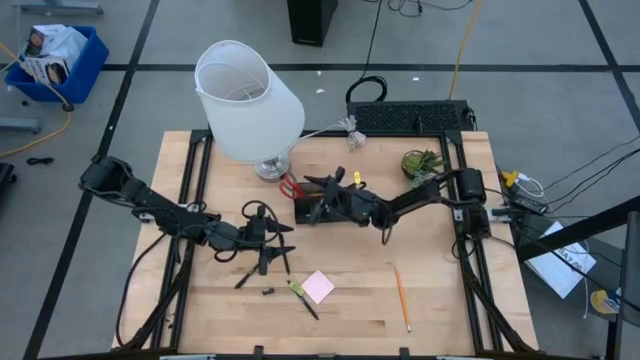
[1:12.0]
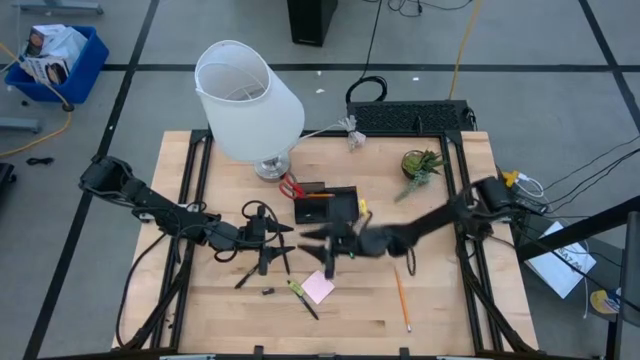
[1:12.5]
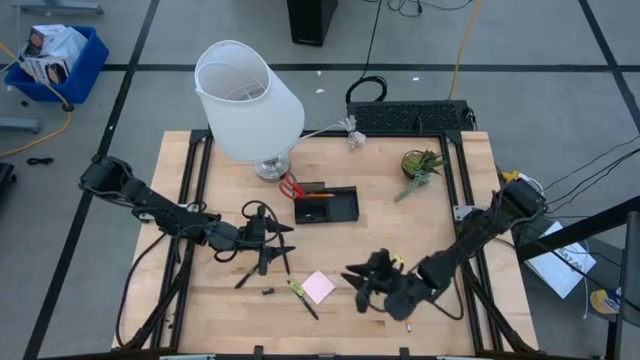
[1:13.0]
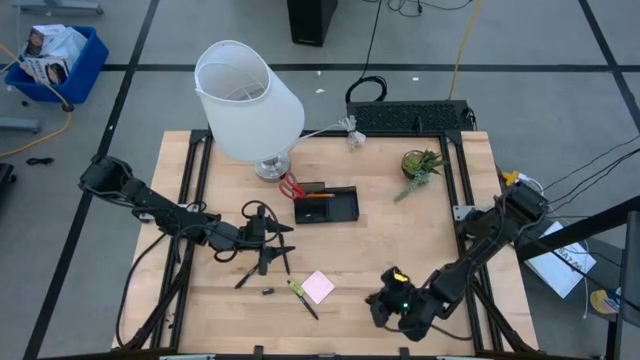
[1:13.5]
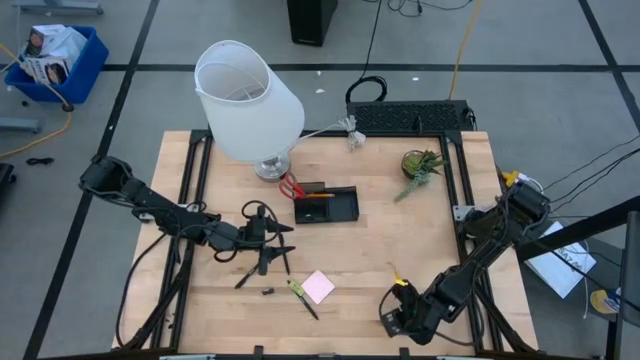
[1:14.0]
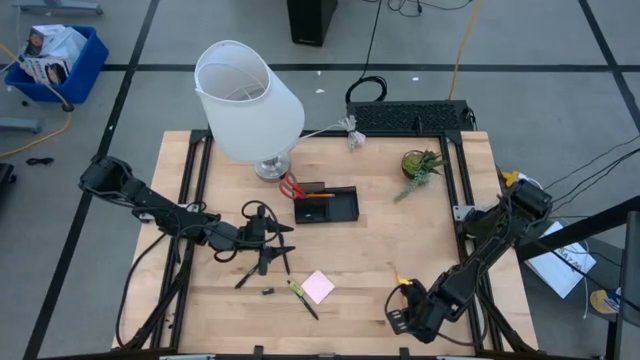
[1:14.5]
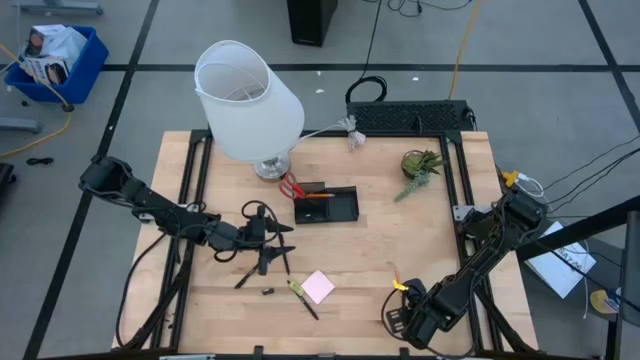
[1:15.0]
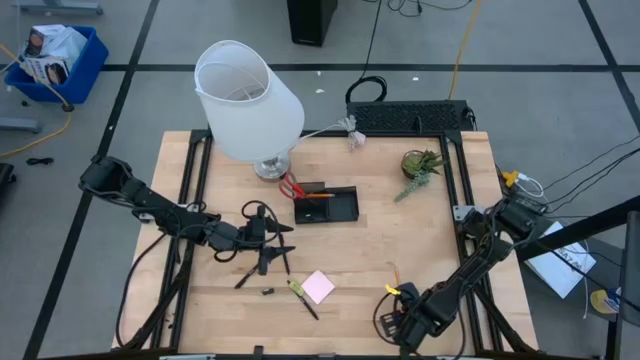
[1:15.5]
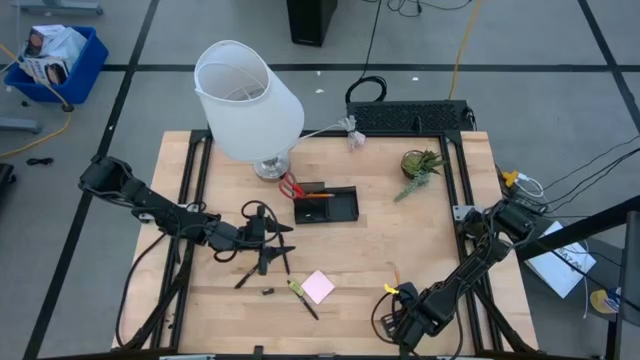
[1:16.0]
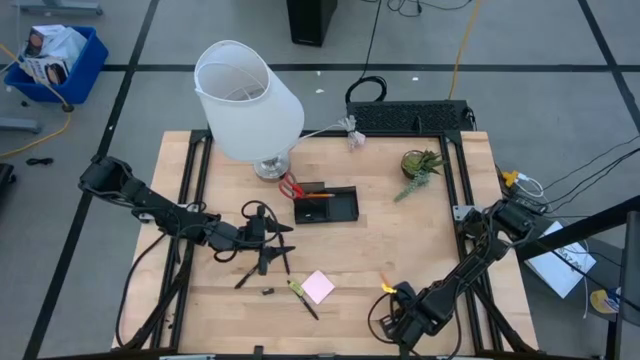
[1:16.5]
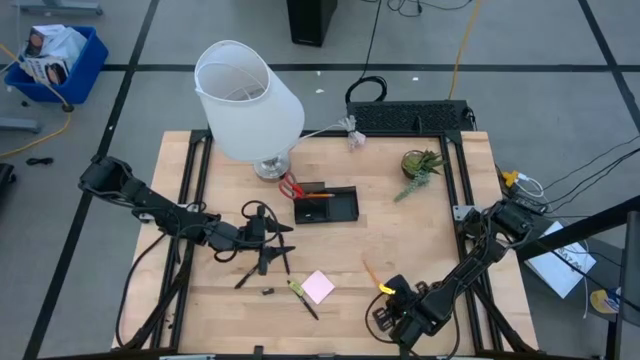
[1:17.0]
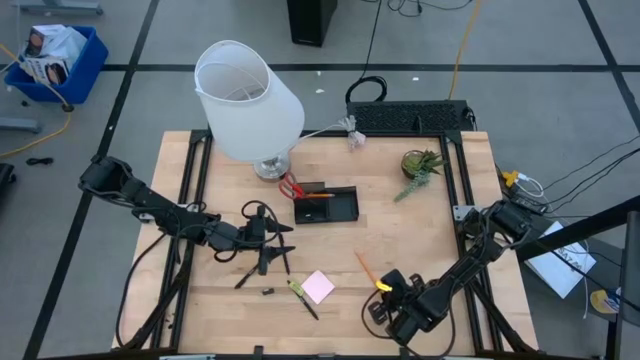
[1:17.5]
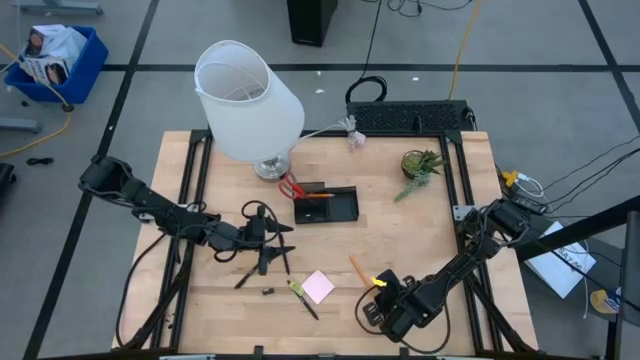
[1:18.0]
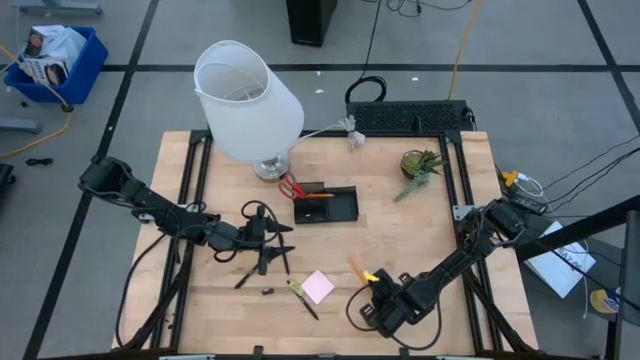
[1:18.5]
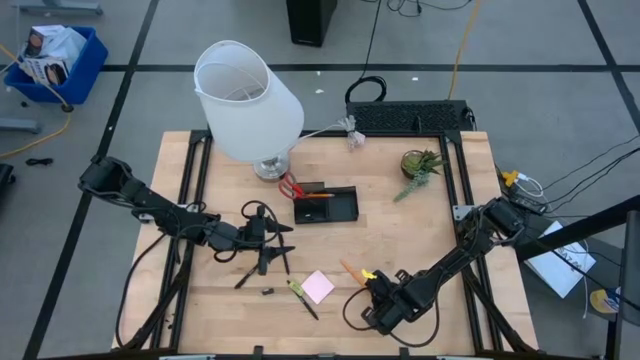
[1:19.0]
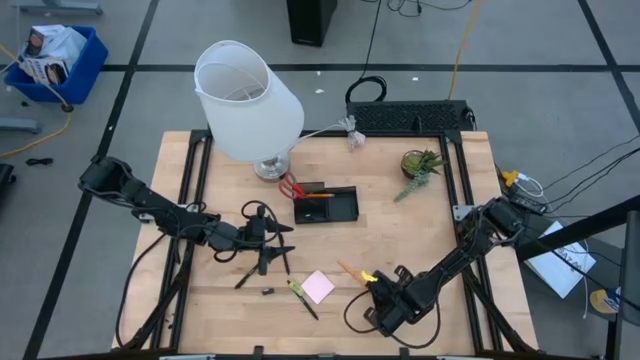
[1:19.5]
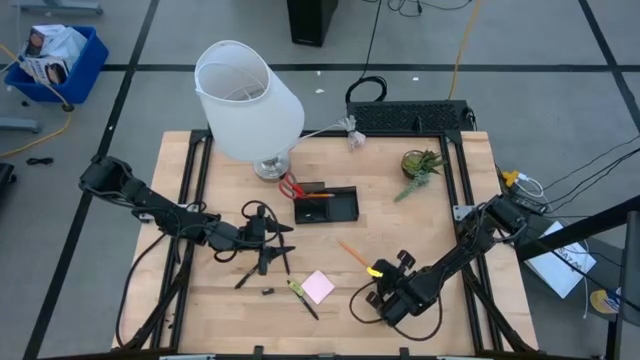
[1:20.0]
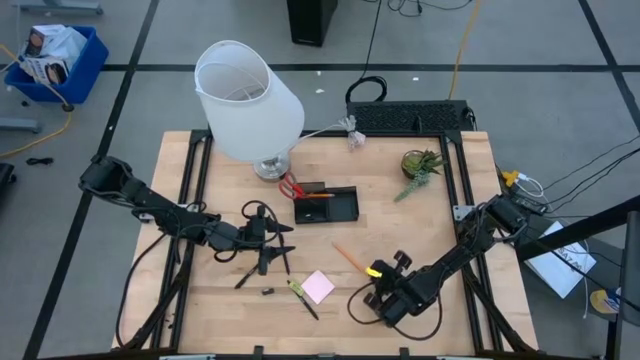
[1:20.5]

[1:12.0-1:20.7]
Task: Pick and place office supplies into organizer
Put the yellow pencil into the top left compartment of the desk organizer

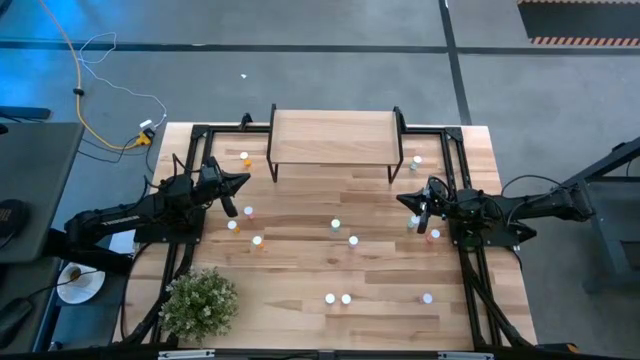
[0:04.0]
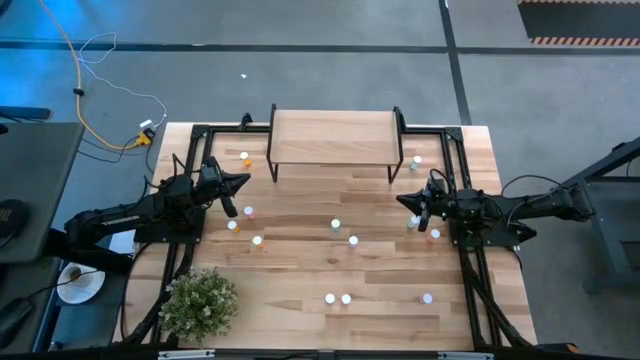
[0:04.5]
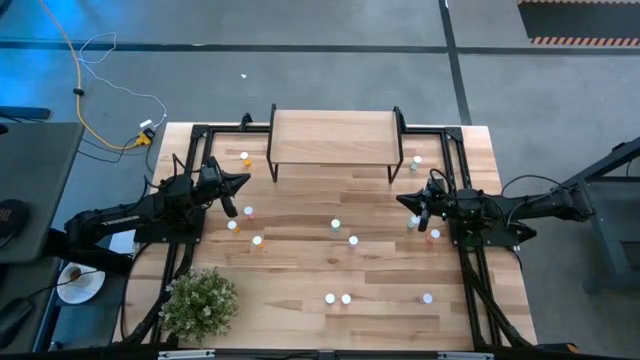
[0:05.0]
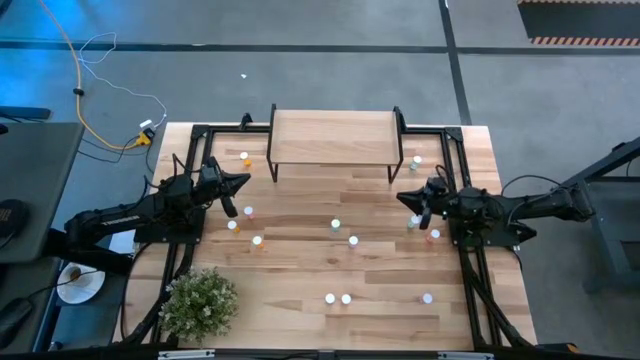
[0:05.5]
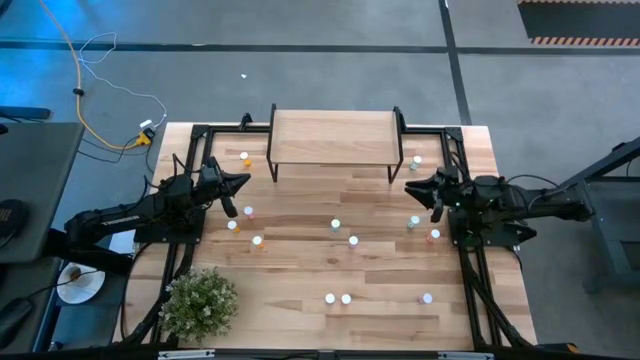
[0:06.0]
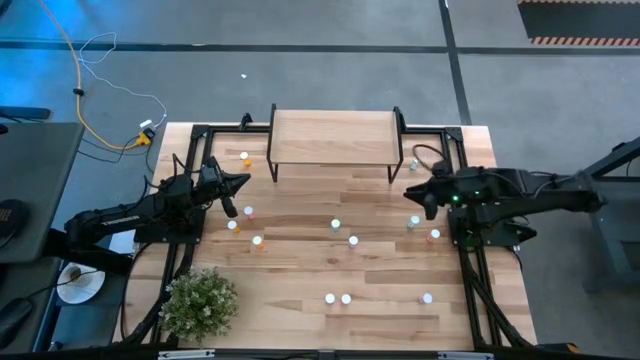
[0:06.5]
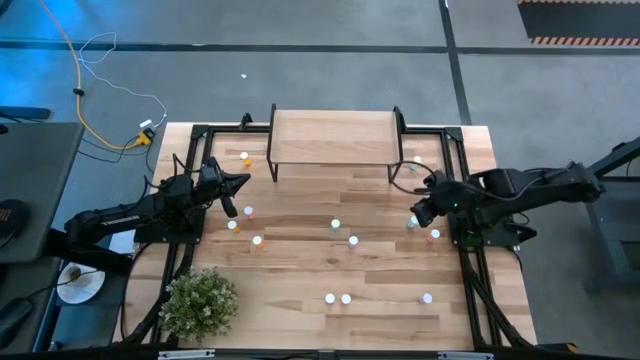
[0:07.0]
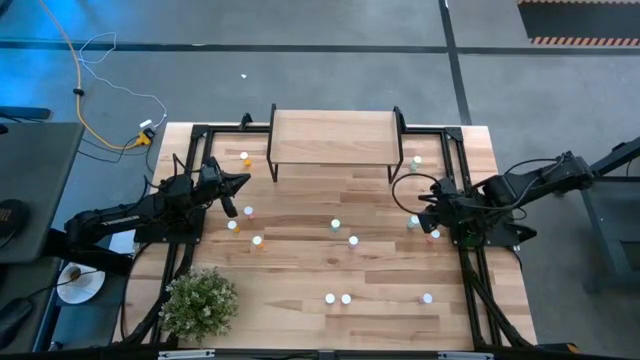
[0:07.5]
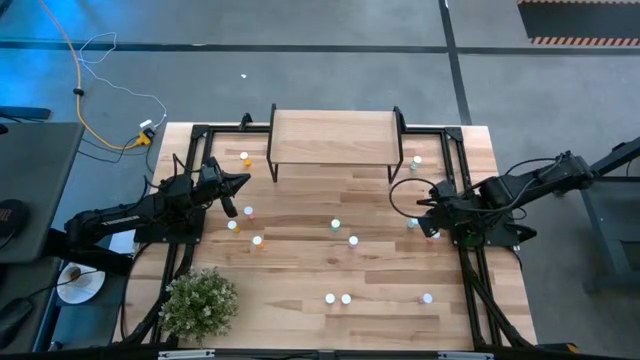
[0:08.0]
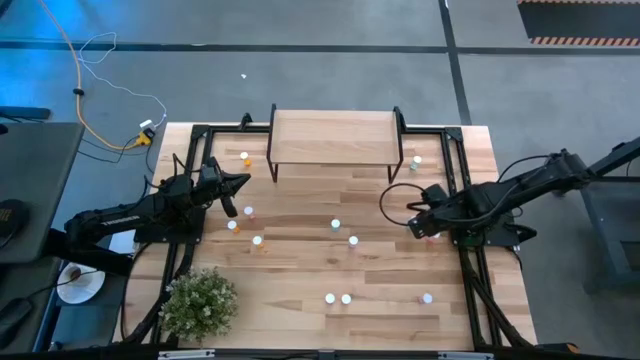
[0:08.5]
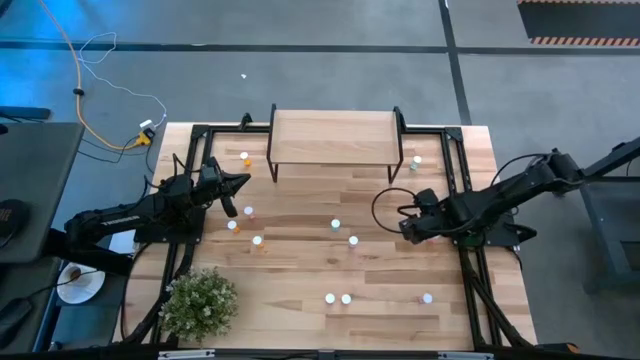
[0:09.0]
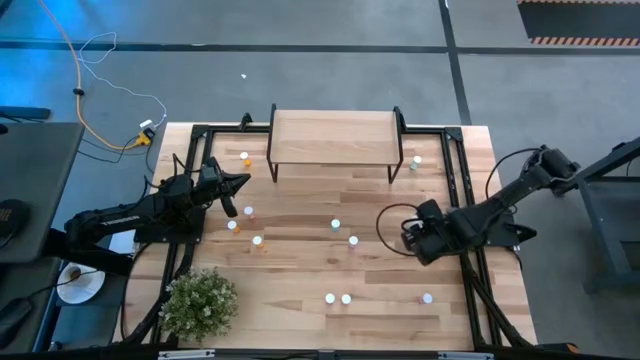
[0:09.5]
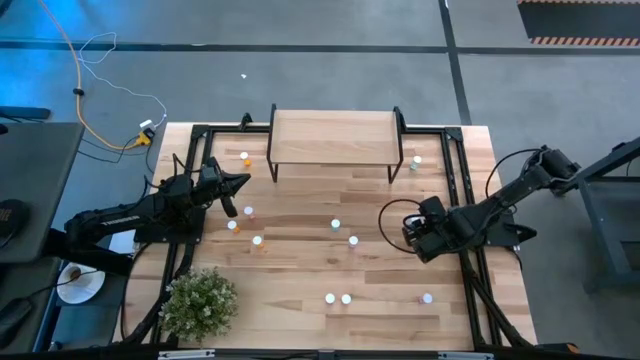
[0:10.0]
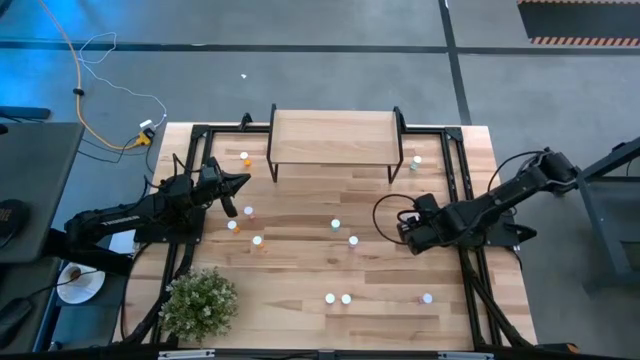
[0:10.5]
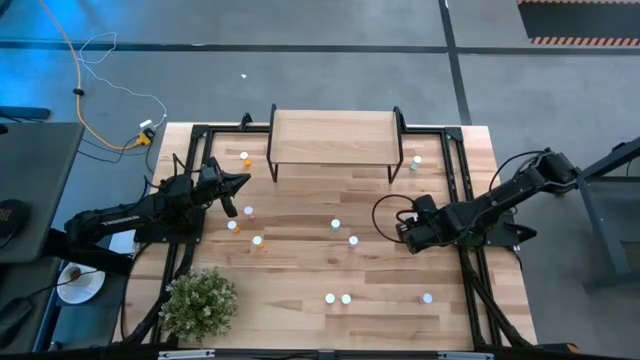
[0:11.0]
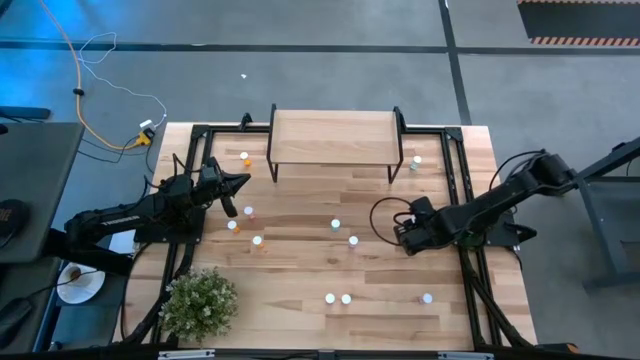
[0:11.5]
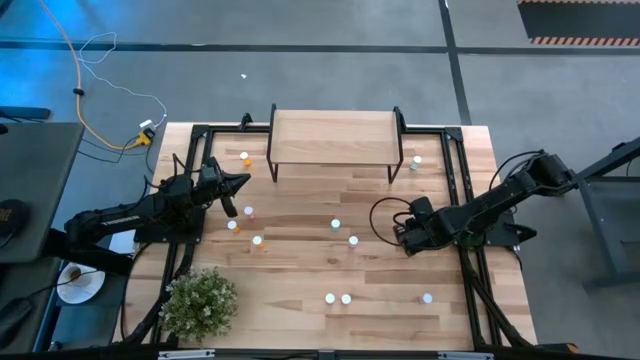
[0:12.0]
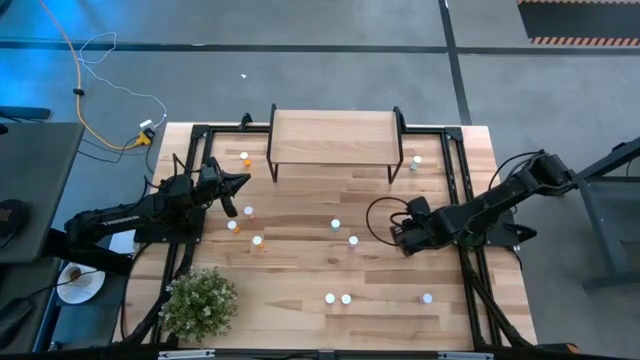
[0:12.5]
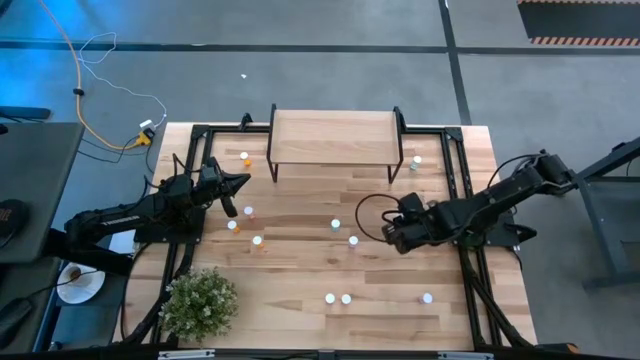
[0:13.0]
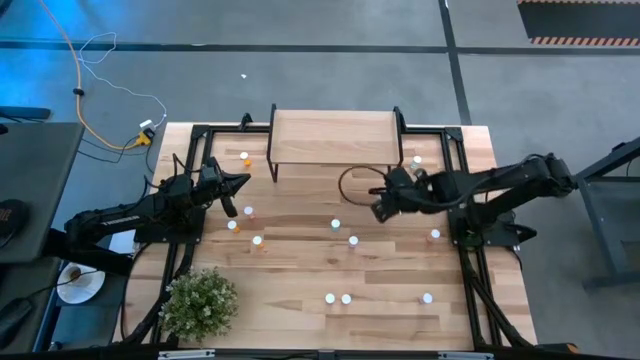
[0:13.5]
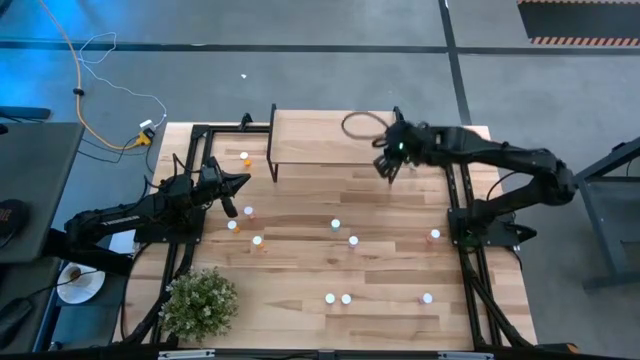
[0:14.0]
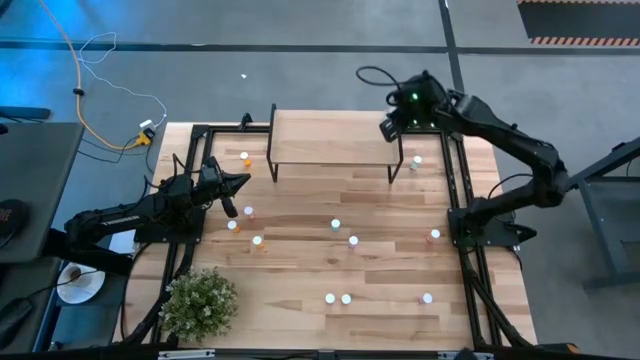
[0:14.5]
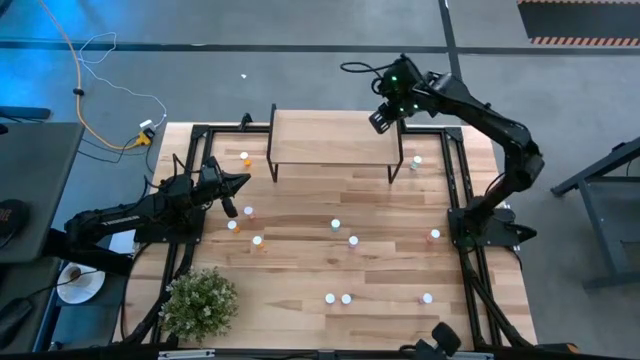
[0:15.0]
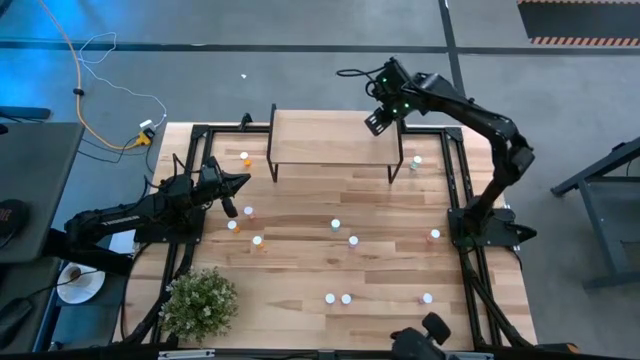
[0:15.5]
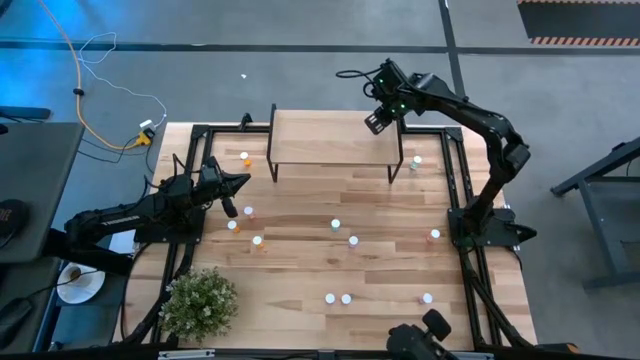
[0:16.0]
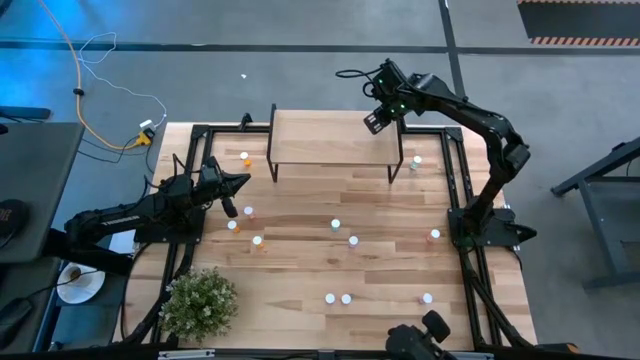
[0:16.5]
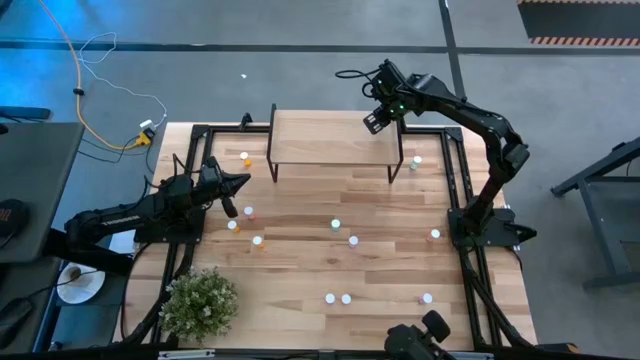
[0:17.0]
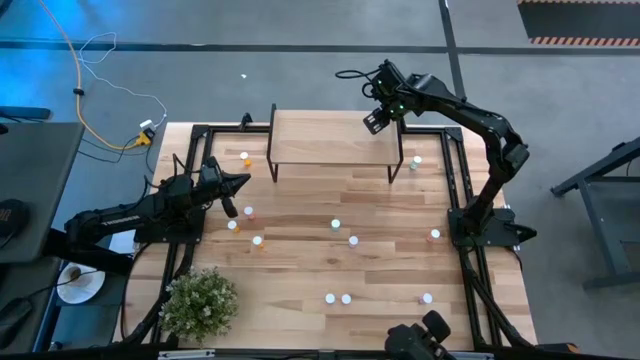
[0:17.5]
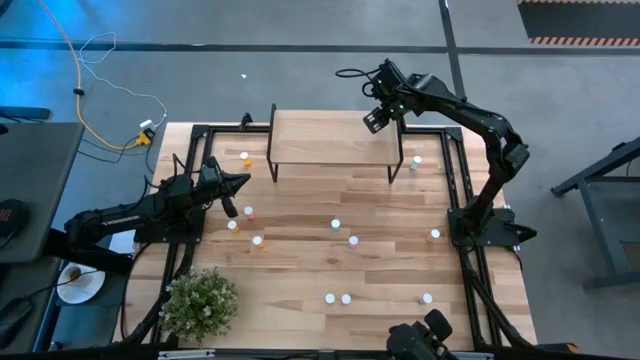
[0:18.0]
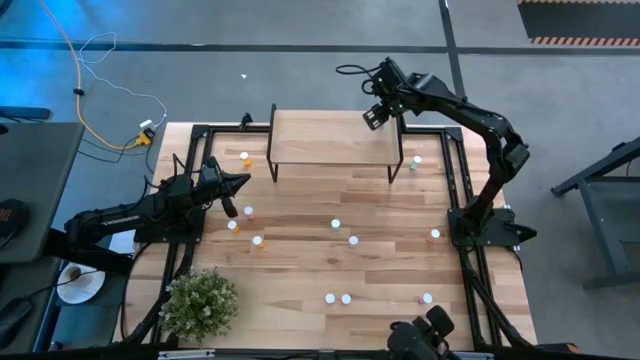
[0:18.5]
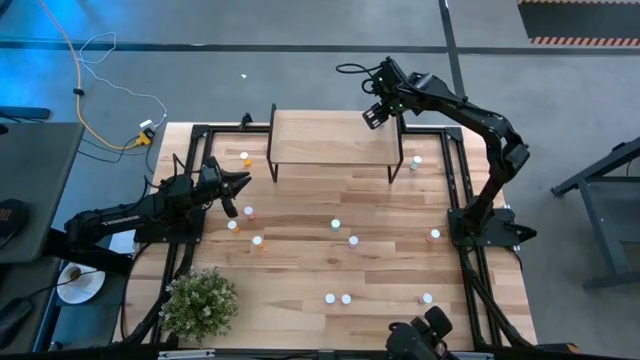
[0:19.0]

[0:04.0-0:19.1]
Task: Pick and place medicine bottles onto shelf by color
Put the bottom right blue pill bottle on the shelf
